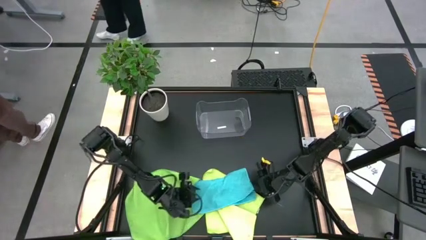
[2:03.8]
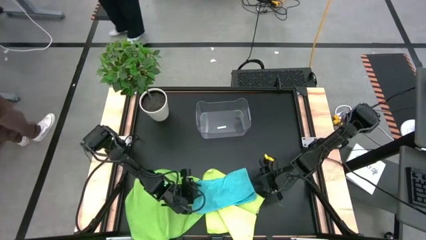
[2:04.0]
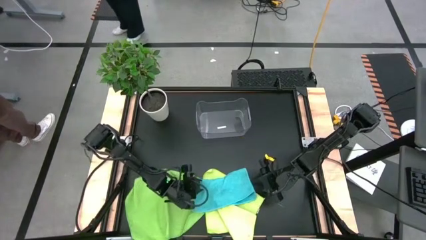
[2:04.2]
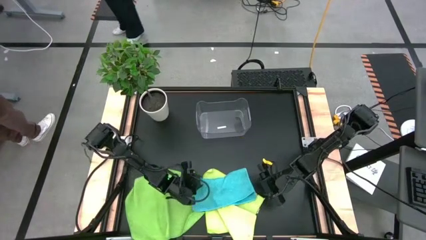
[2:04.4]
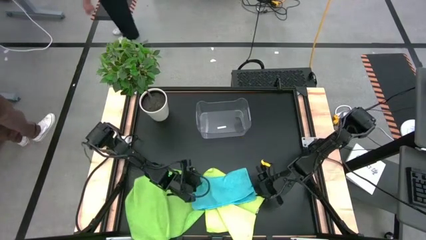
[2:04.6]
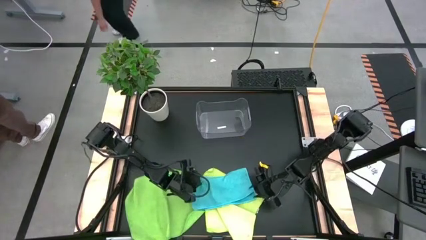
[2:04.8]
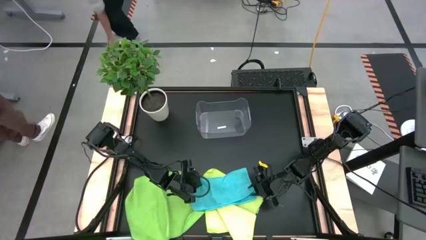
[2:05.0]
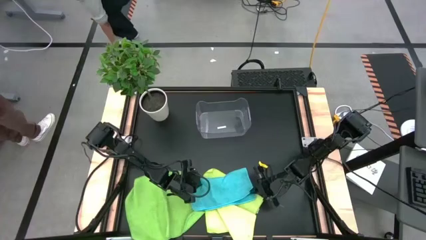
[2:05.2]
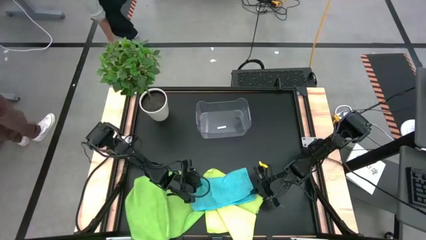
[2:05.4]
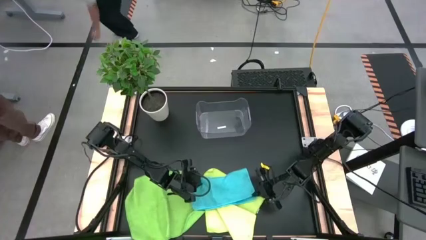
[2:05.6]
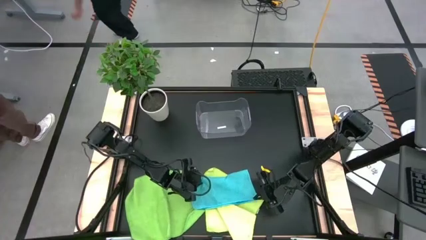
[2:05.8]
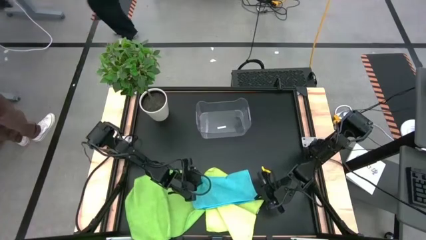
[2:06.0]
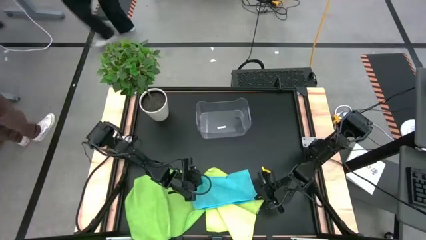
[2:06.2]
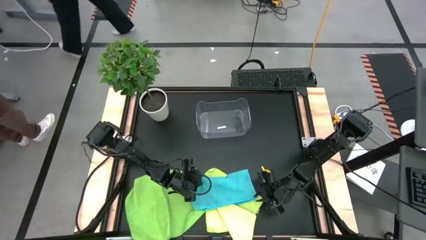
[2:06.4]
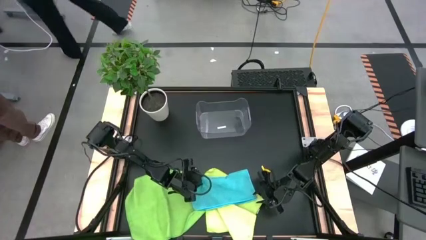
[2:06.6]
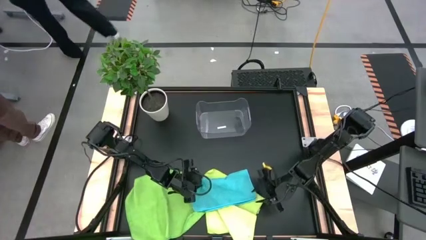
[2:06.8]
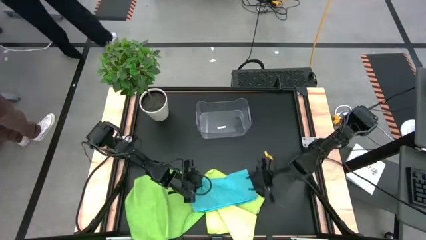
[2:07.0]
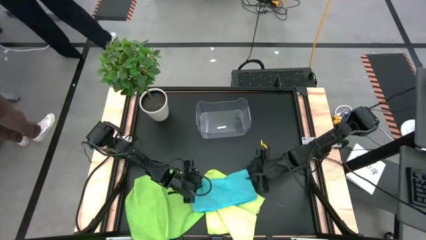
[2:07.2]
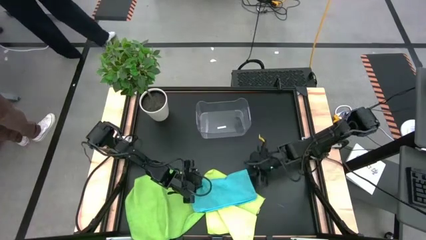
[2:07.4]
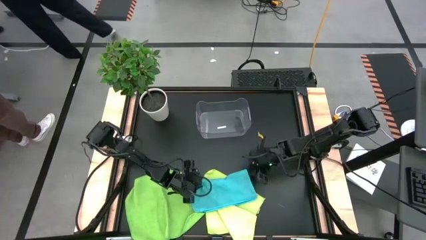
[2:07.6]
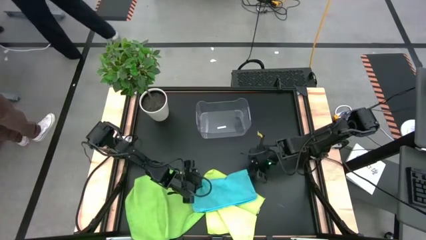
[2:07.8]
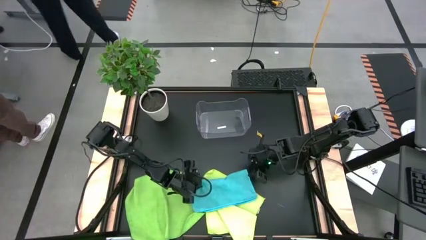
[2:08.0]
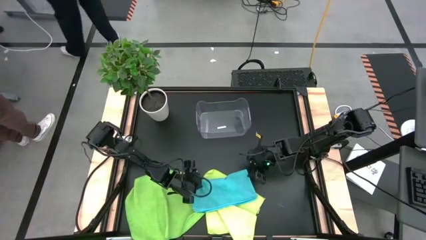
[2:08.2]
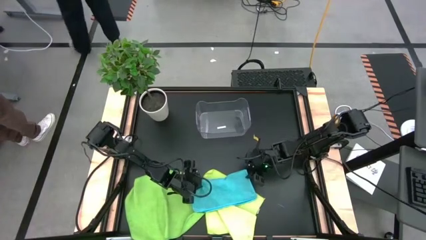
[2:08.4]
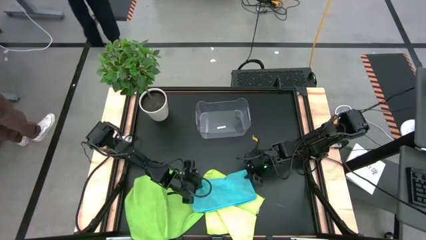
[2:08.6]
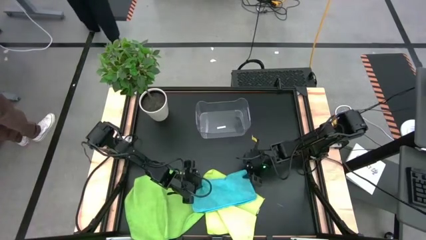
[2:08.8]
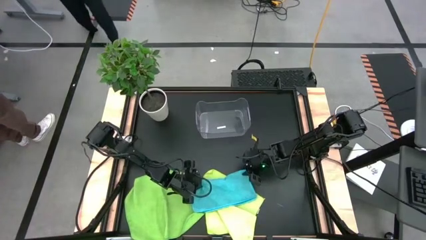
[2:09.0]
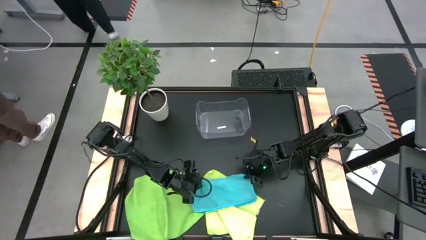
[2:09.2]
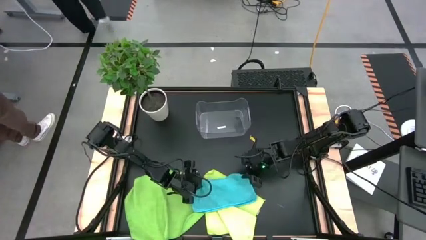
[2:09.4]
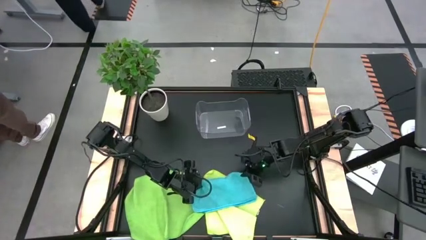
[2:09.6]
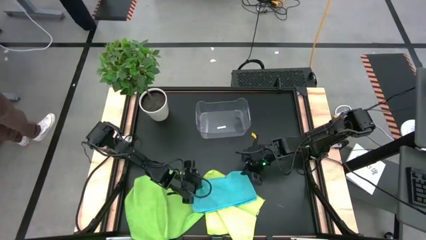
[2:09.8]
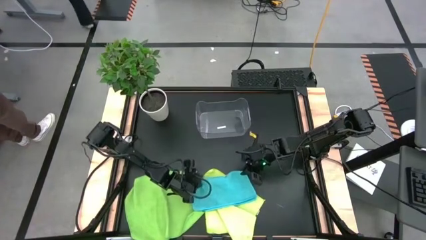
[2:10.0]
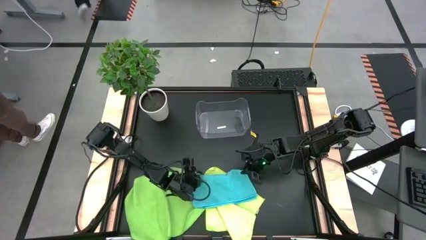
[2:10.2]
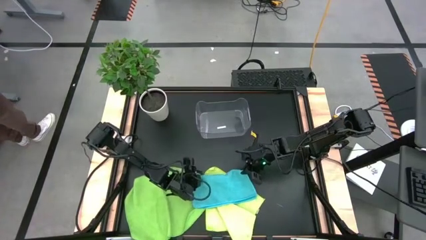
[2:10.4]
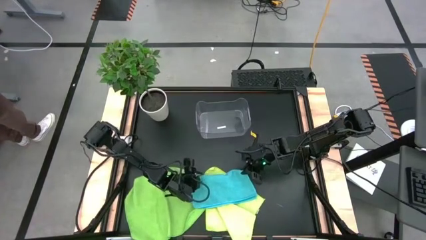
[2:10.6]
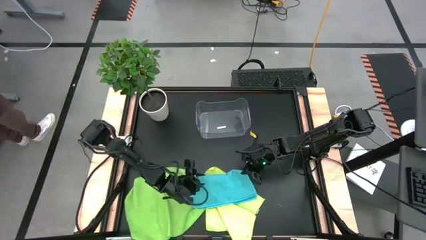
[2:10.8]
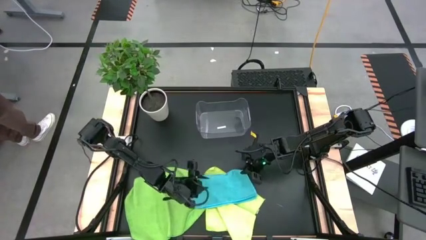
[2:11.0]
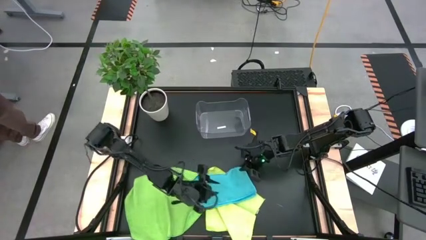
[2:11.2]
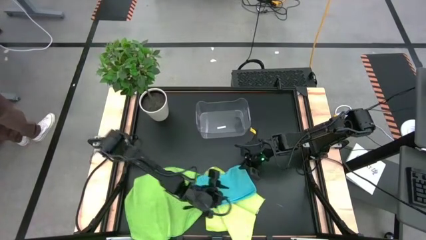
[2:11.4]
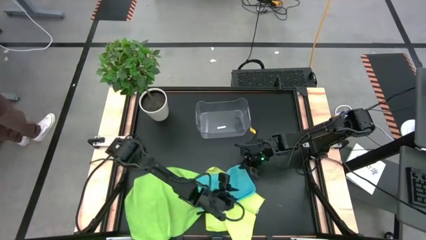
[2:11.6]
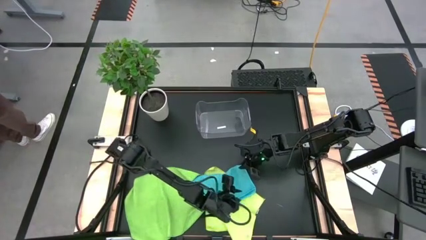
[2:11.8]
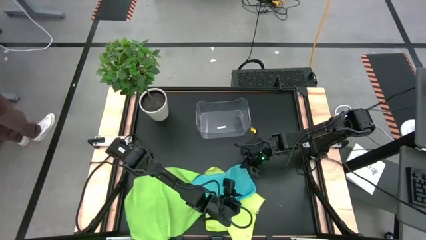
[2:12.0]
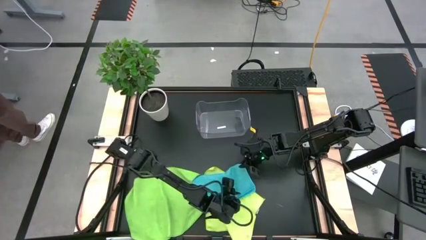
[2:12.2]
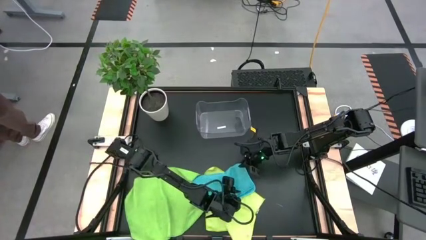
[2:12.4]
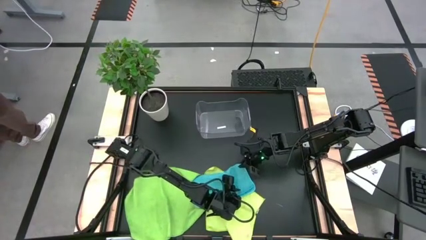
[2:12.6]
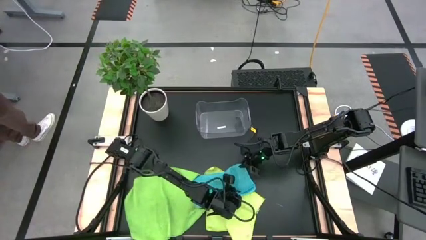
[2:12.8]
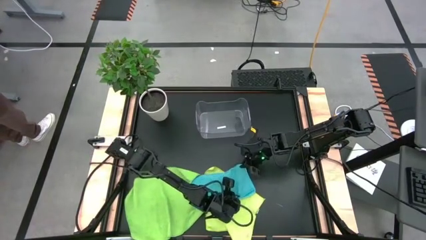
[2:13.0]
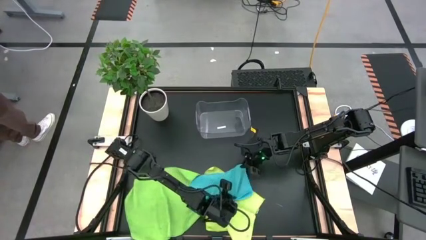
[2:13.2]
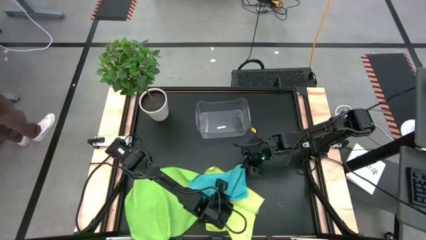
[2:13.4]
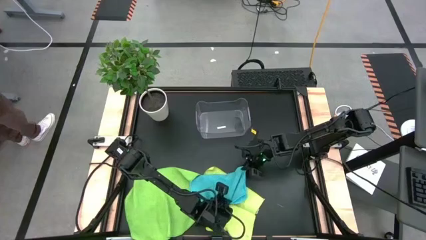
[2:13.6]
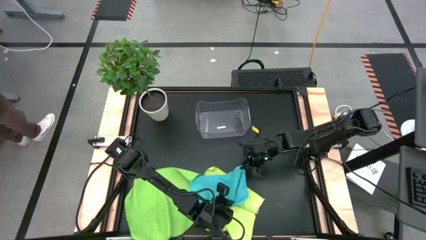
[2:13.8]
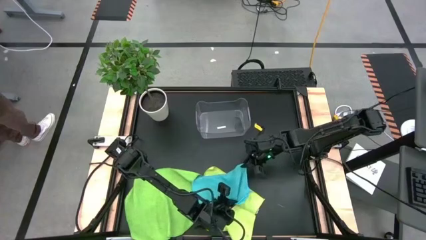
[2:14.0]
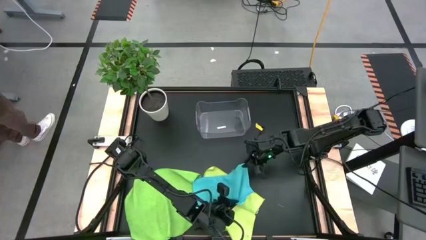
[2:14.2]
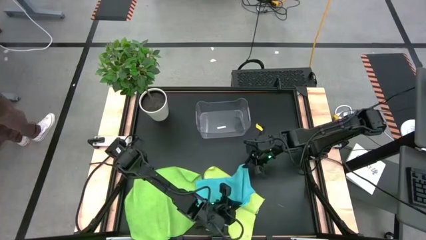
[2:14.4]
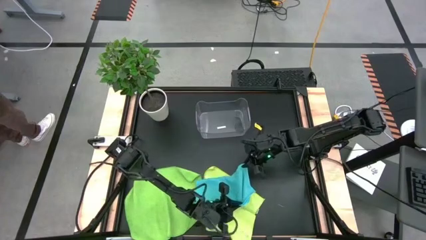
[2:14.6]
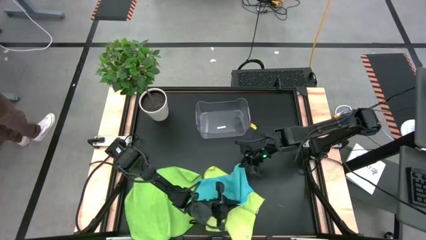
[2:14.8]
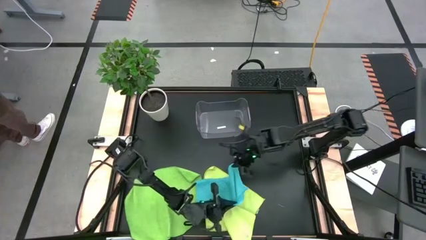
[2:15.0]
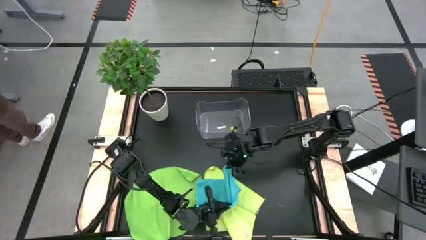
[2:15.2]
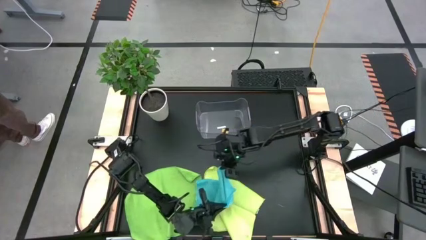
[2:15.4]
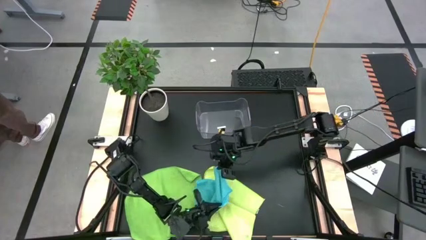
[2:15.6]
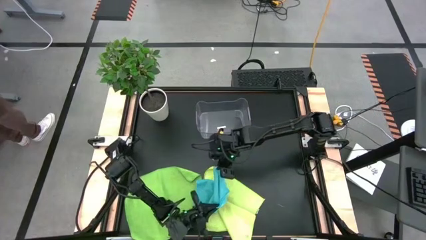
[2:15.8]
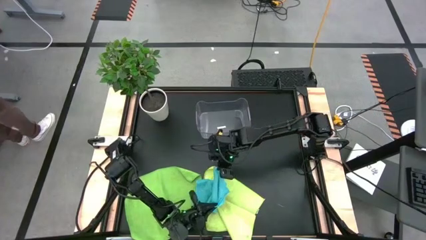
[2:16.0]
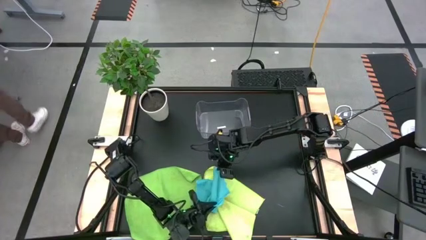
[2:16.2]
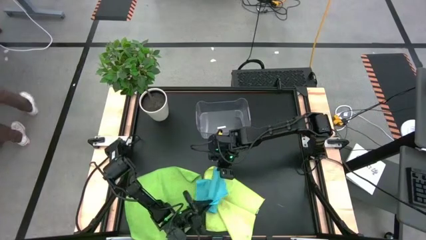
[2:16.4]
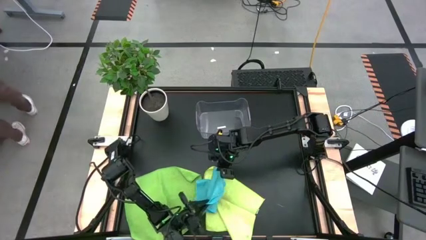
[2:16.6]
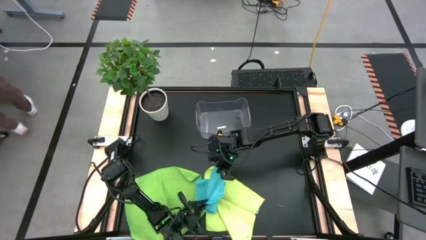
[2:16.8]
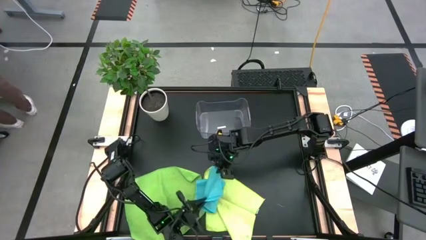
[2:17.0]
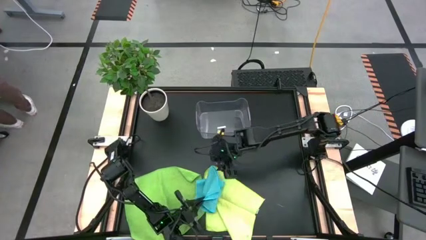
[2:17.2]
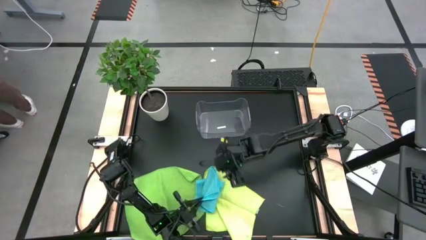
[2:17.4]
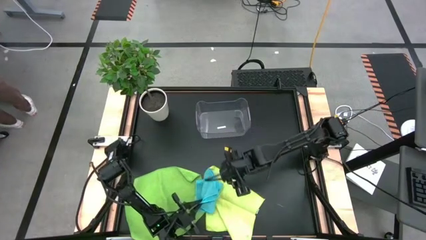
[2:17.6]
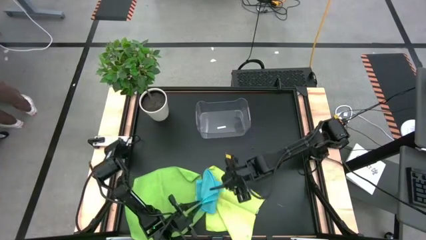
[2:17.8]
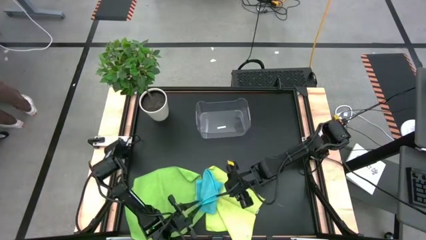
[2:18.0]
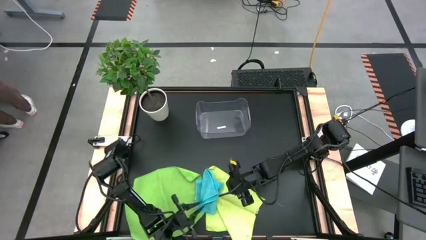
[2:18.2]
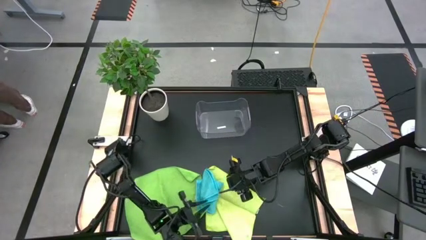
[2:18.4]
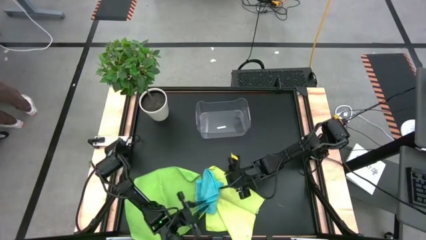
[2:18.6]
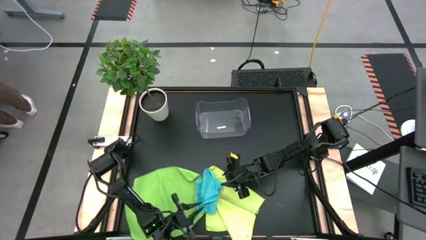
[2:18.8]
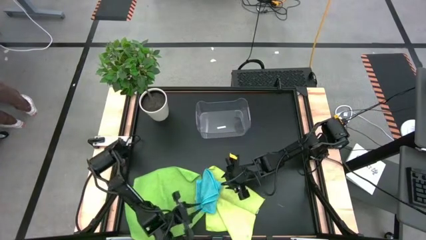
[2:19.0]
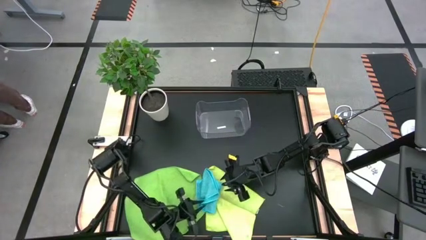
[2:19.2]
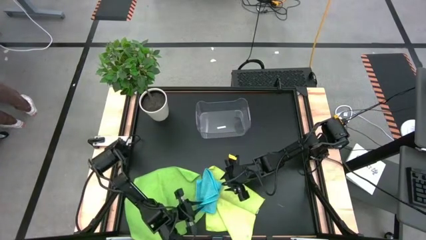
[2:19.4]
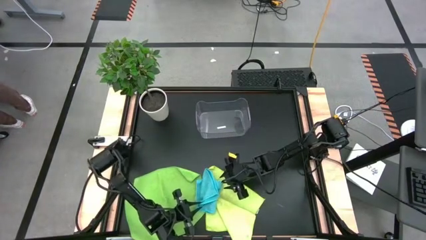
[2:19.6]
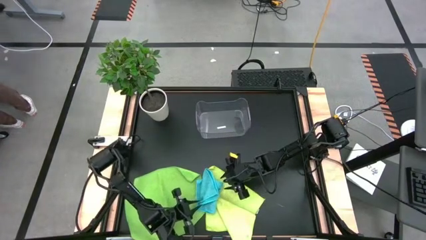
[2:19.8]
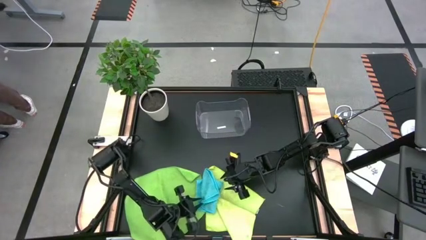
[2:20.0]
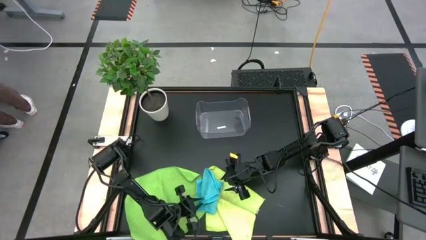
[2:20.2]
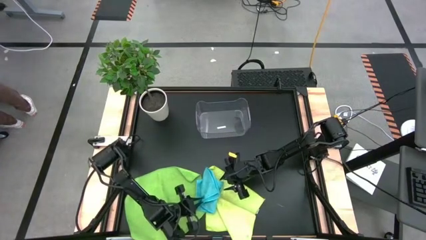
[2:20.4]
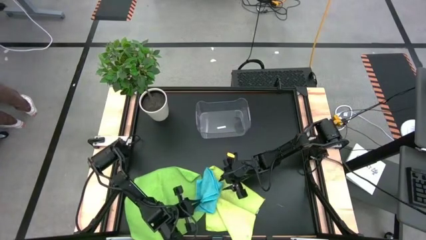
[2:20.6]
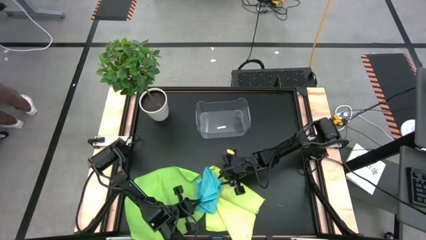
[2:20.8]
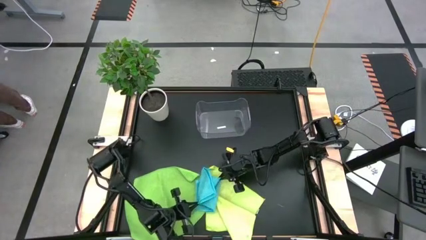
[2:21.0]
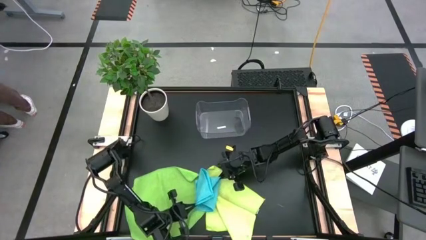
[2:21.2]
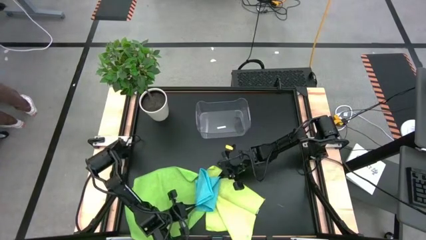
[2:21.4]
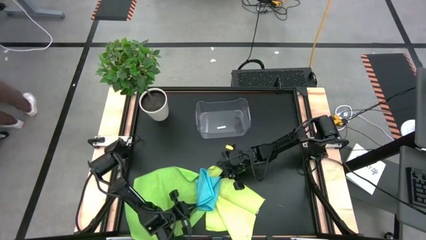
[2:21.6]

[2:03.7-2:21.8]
Task: Fold microfiber towels
Fold the blue towel
